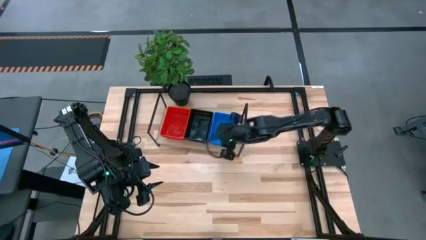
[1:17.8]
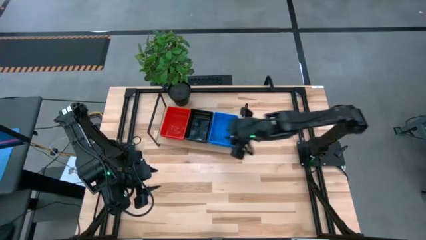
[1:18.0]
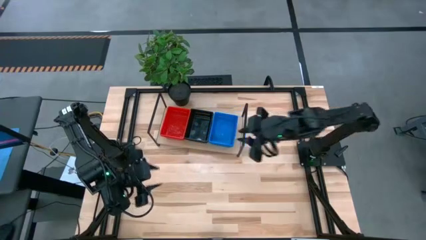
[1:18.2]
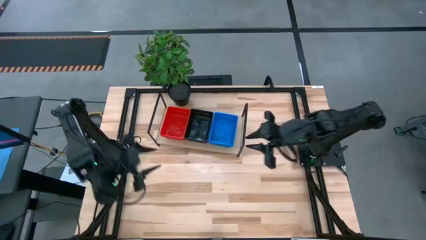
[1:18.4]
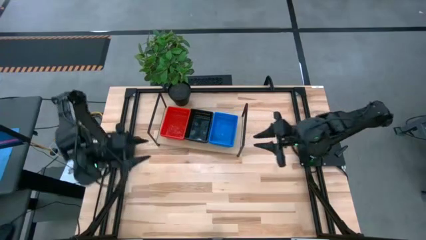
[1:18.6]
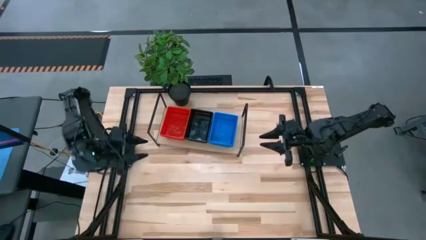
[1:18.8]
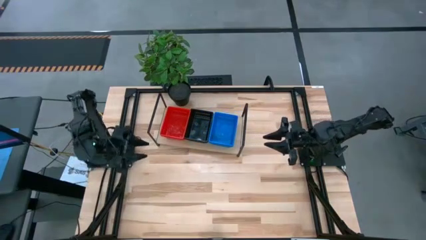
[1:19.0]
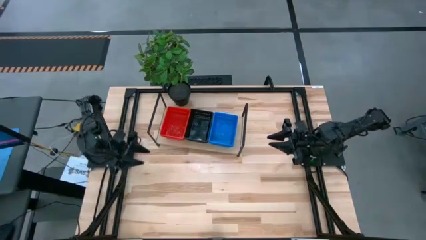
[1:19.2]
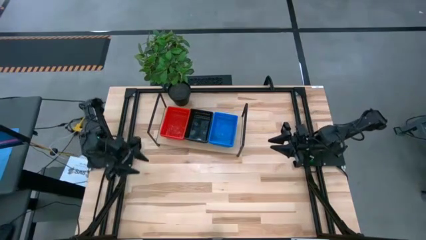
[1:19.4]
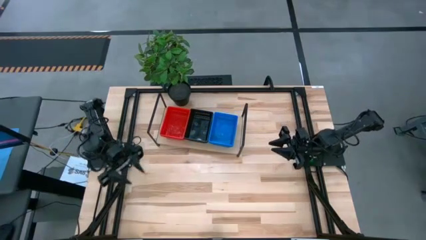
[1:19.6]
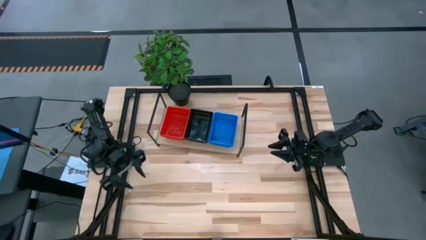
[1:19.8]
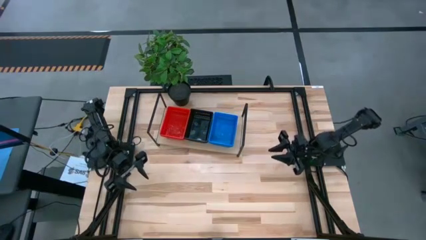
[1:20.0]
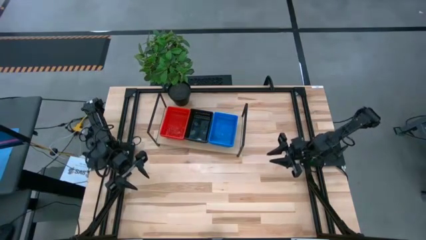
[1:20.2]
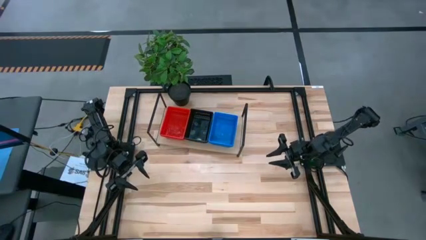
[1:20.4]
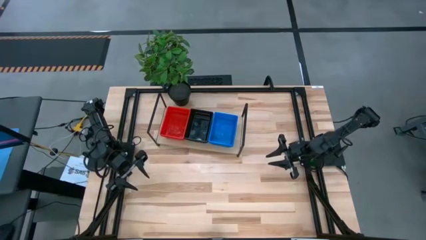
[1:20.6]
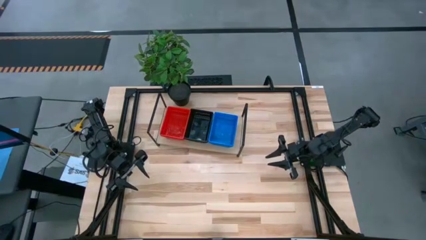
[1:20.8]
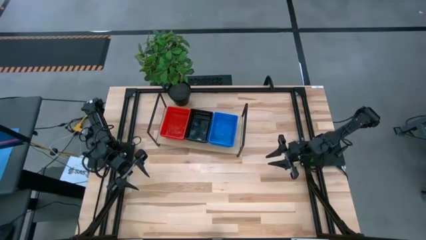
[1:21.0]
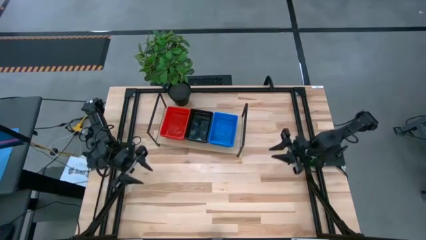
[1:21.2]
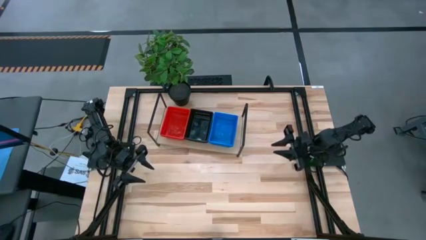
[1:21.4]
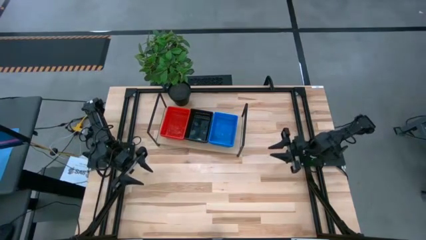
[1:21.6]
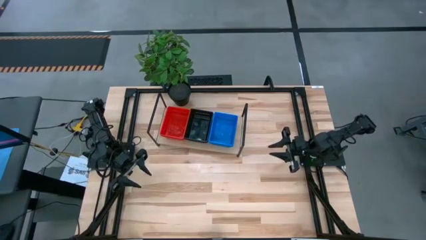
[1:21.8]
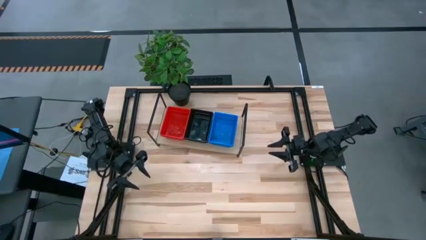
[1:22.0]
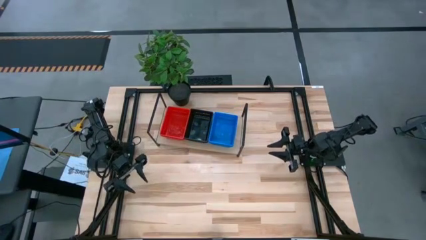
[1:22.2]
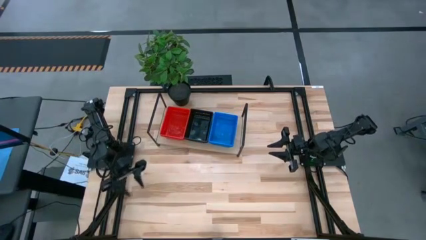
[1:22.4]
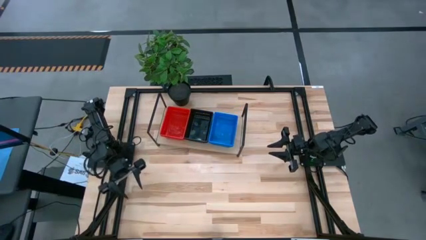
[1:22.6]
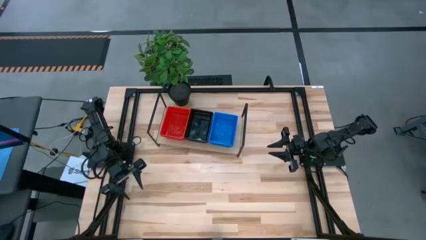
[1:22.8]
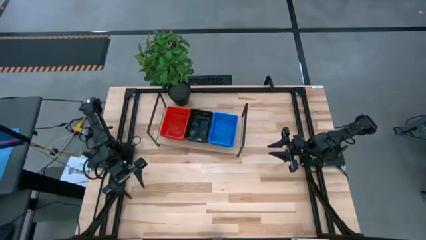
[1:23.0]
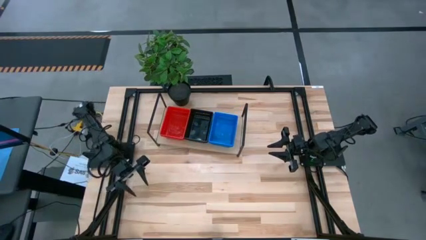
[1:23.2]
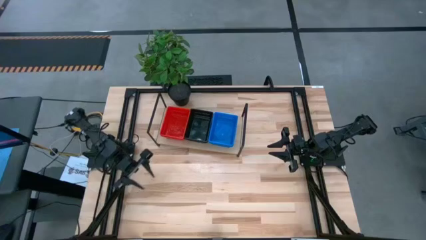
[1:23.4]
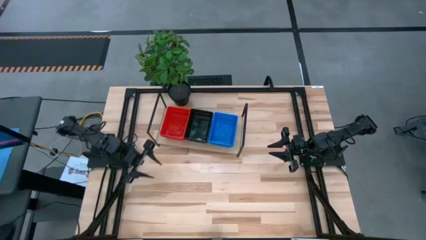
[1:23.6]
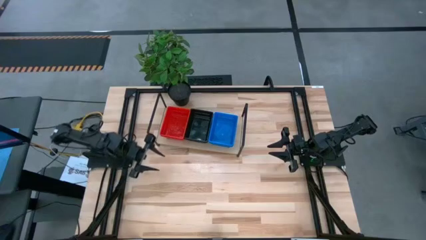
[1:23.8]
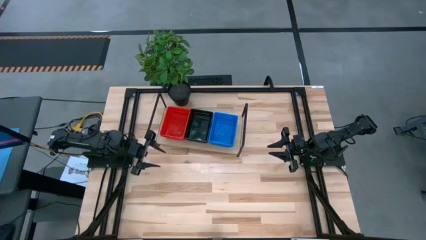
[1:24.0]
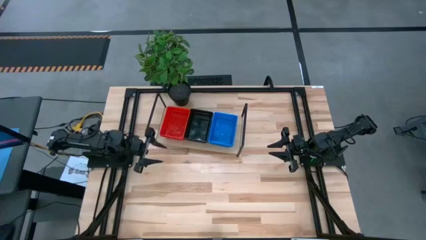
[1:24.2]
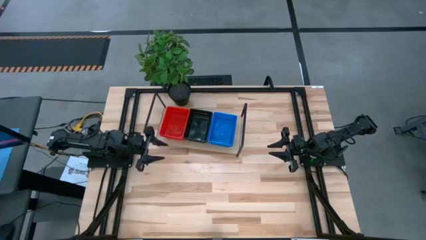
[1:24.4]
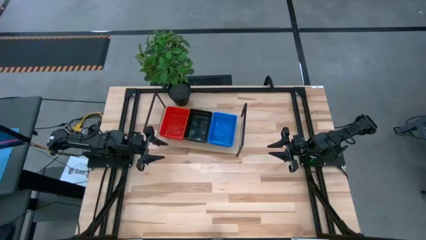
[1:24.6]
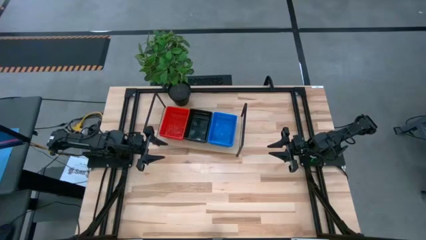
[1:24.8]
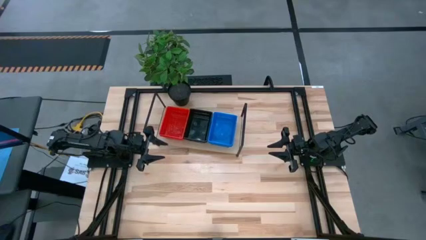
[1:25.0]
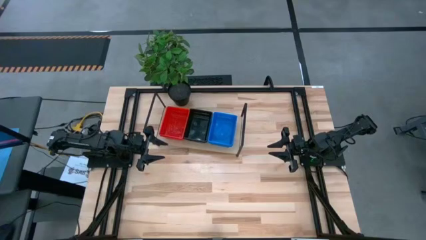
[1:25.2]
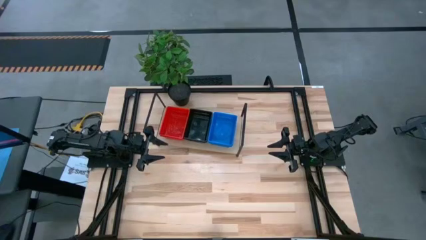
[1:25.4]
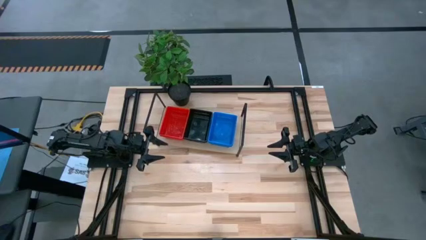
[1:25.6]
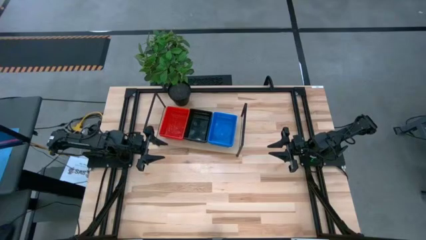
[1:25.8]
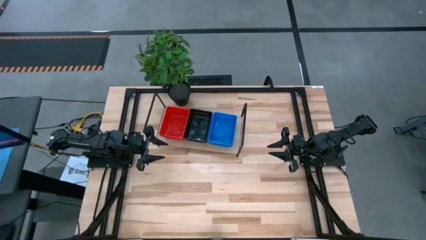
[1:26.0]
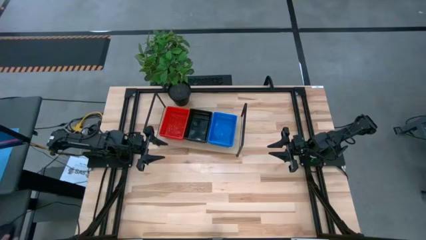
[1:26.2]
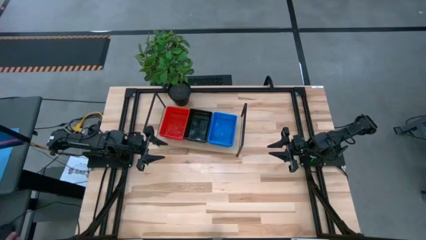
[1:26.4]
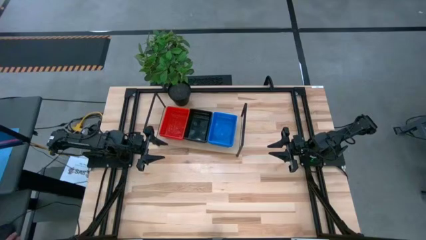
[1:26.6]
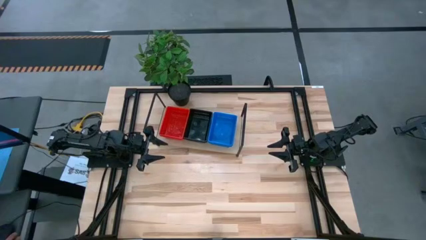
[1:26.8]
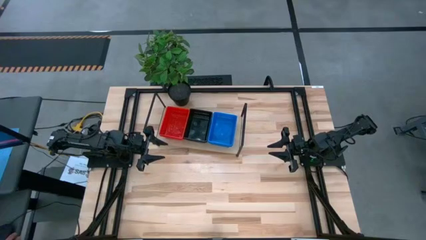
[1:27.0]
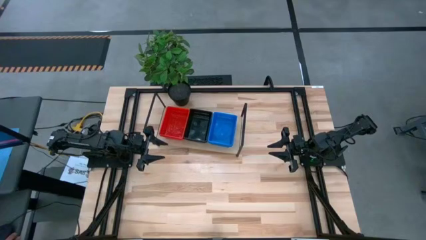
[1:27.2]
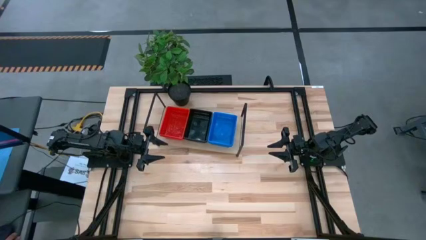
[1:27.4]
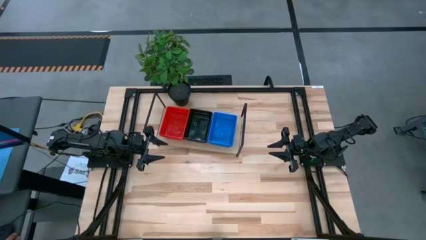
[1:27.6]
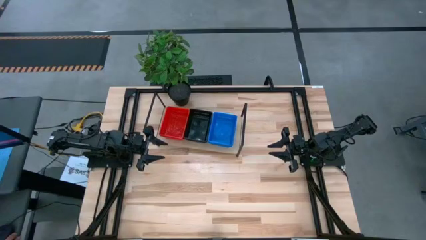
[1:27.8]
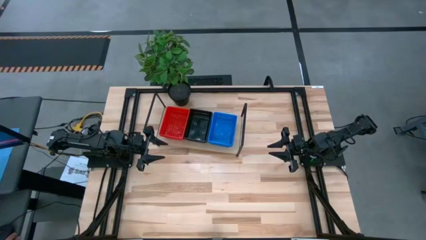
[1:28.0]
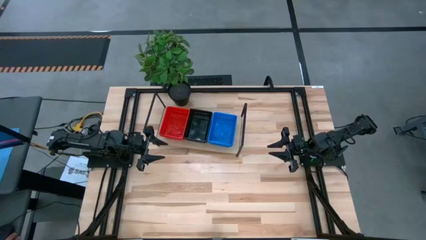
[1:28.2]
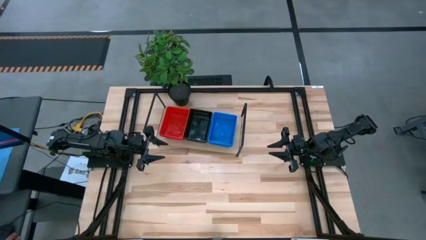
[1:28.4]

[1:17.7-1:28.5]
Task: Stack baskets on shelf by color
Return to Home Position

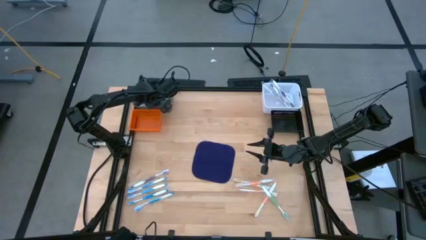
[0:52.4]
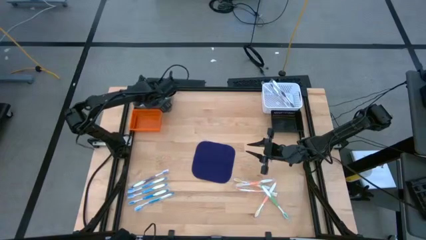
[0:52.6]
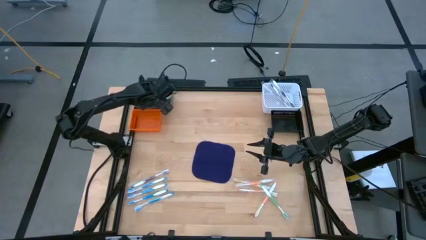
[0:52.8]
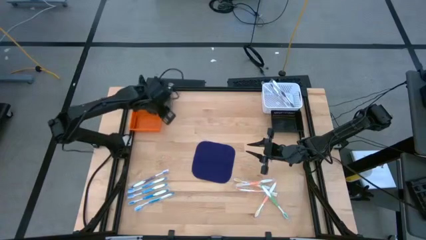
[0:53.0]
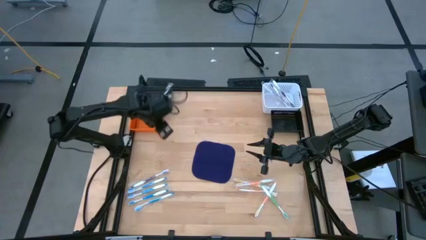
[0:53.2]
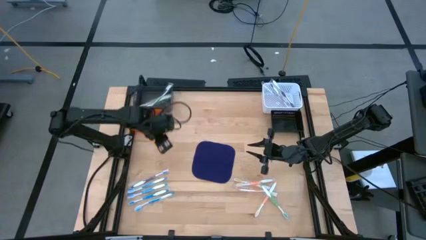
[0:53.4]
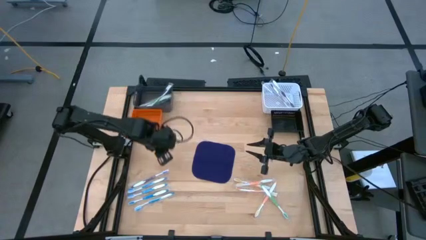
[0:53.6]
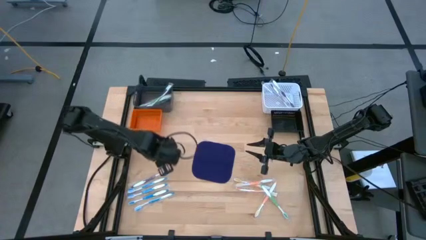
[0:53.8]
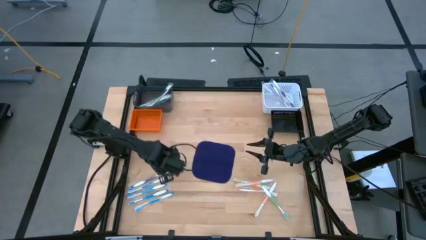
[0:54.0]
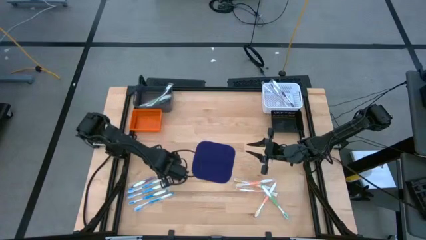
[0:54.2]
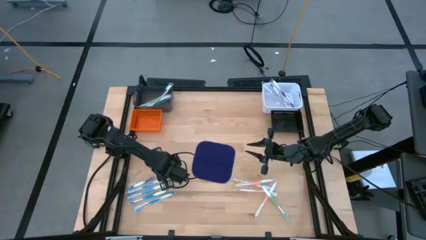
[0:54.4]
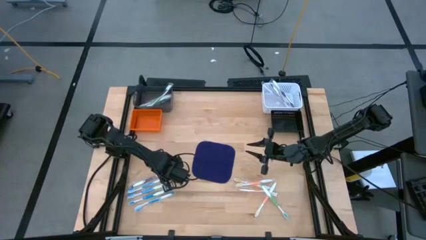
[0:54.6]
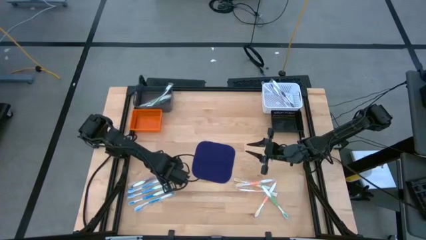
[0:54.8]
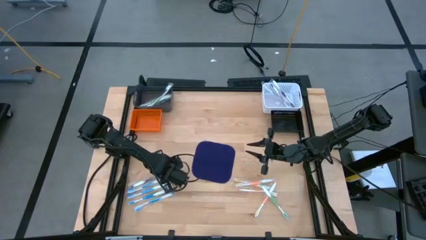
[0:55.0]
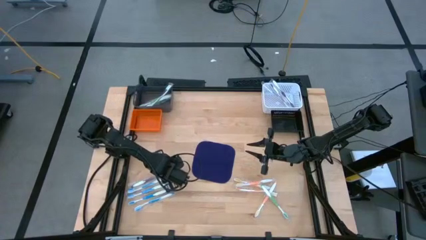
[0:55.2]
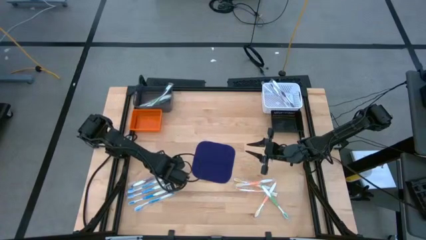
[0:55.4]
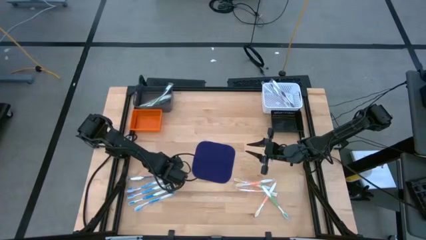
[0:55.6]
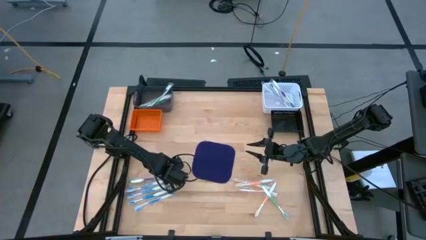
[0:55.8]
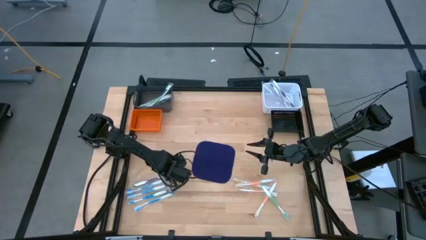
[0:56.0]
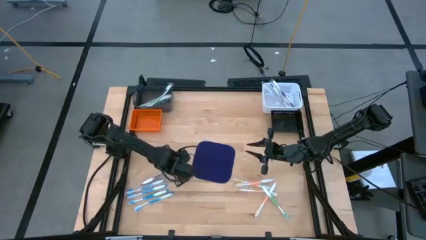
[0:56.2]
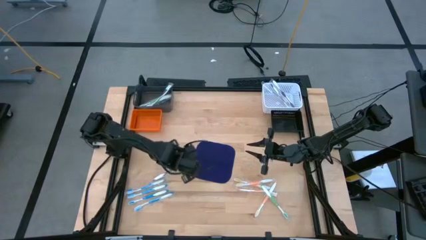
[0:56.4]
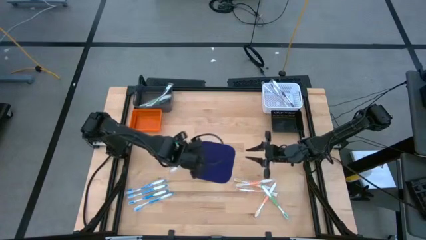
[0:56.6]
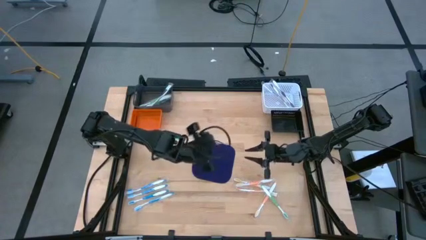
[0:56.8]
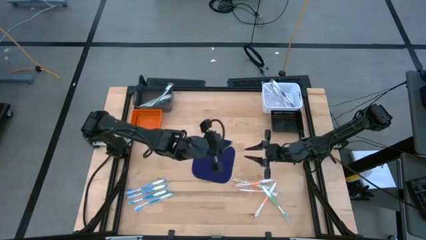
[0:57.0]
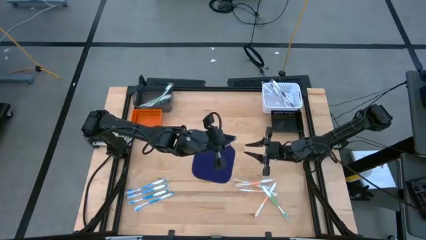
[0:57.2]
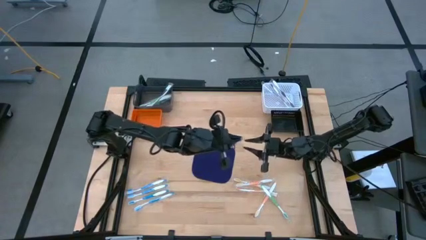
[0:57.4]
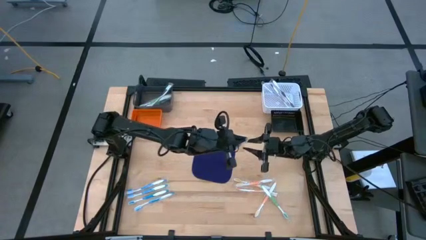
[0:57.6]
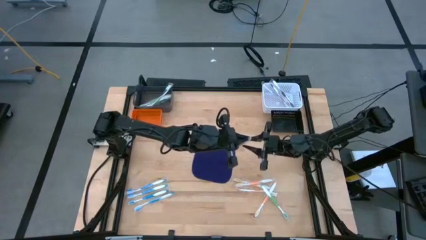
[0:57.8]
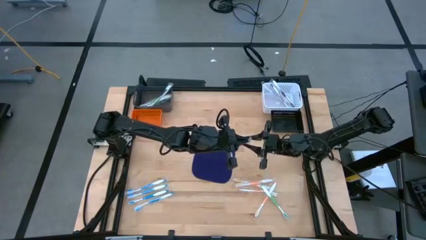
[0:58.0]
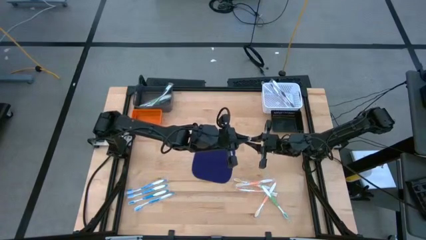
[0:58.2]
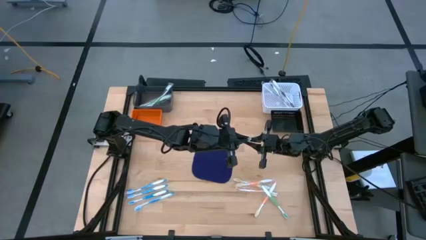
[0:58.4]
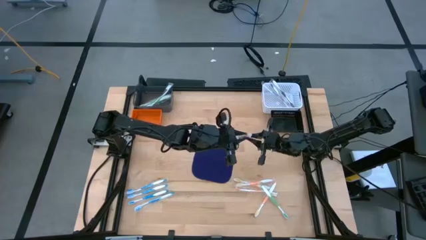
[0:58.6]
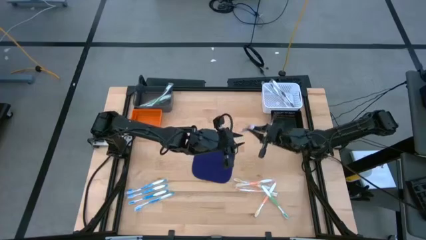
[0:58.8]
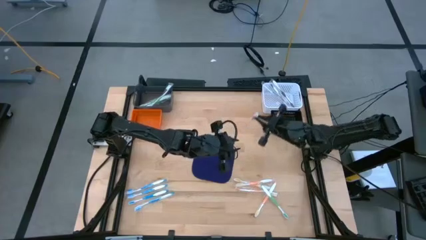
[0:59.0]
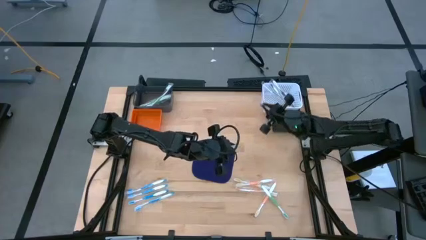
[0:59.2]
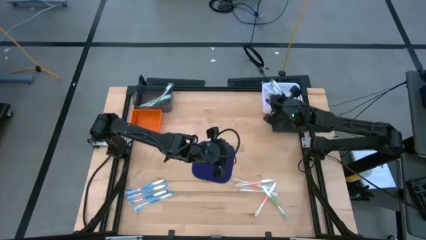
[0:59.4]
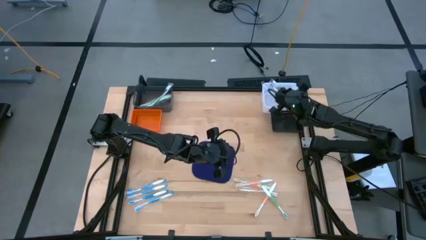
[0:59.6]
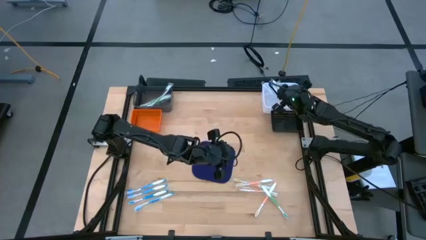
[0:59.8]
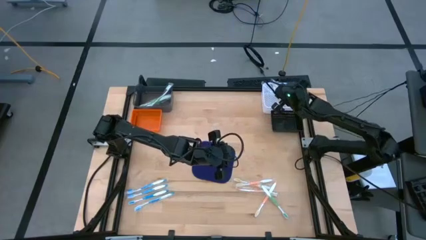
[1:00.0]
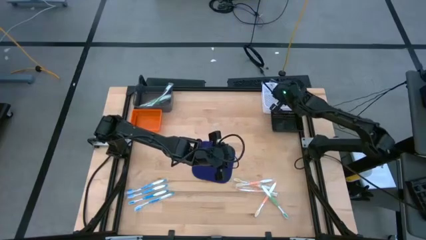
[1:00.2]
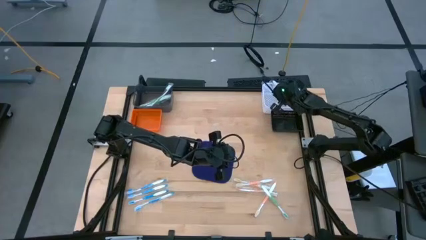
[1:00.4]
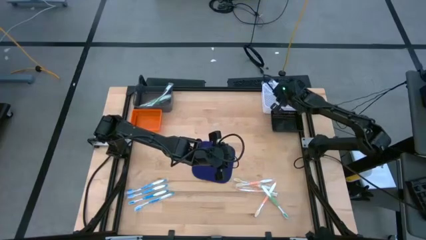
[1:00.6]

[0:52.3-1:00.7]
Task: Pick & Place Toothbrushes
Put the purple toothbrush into the white bin
